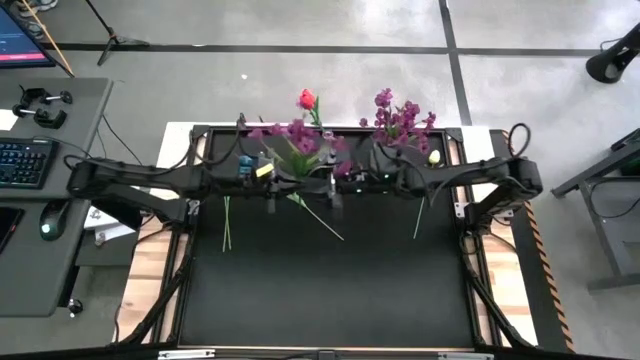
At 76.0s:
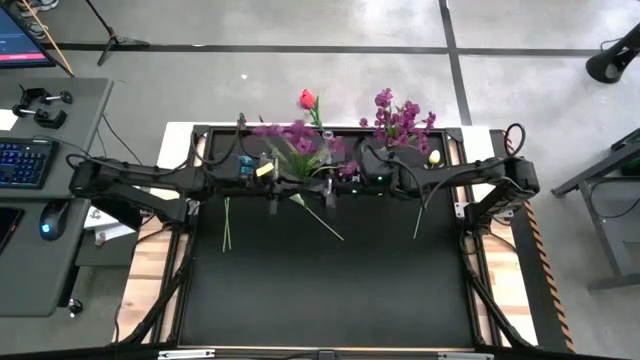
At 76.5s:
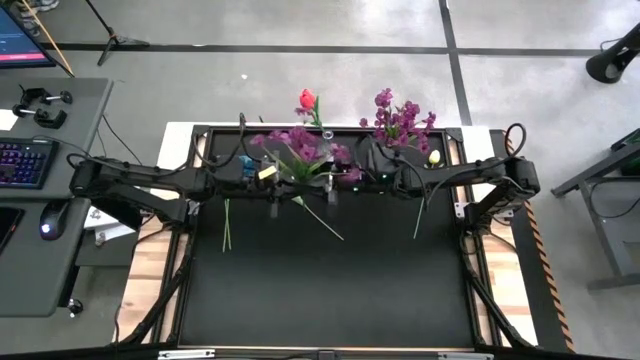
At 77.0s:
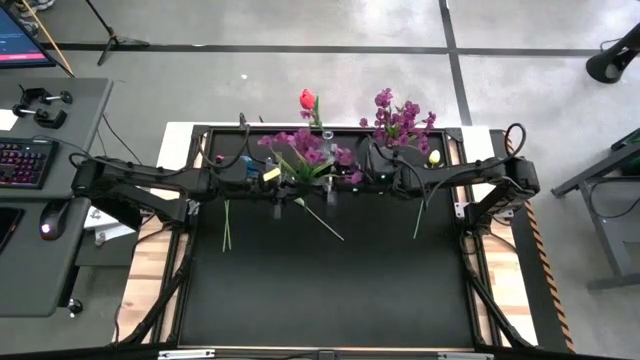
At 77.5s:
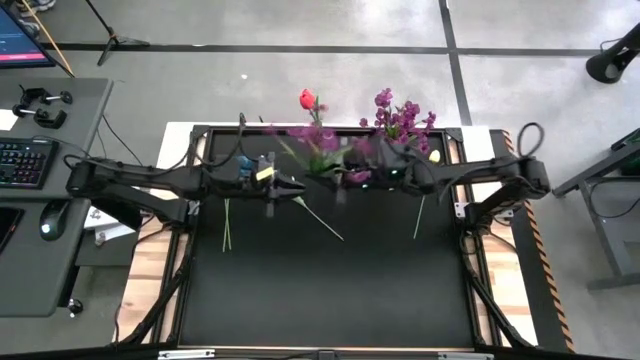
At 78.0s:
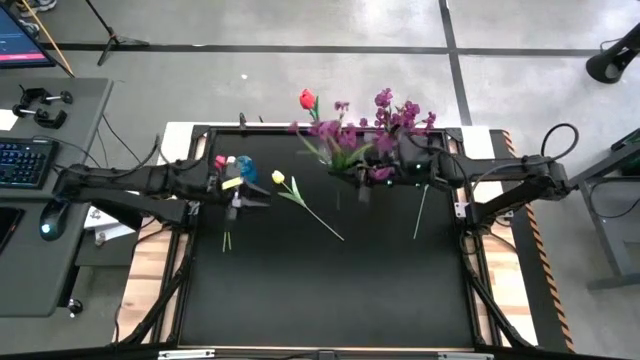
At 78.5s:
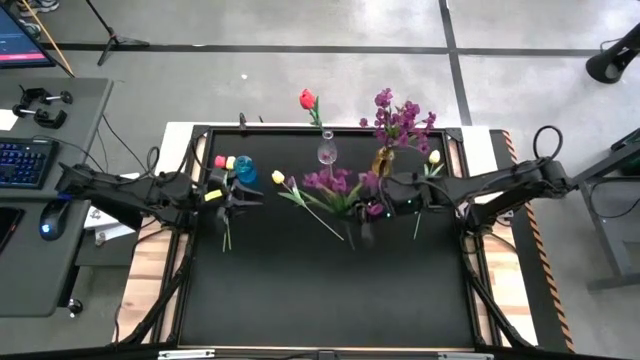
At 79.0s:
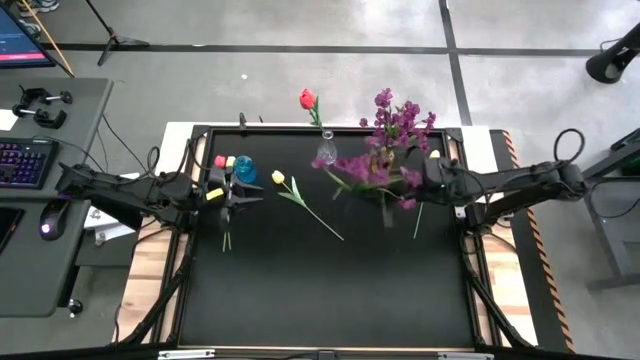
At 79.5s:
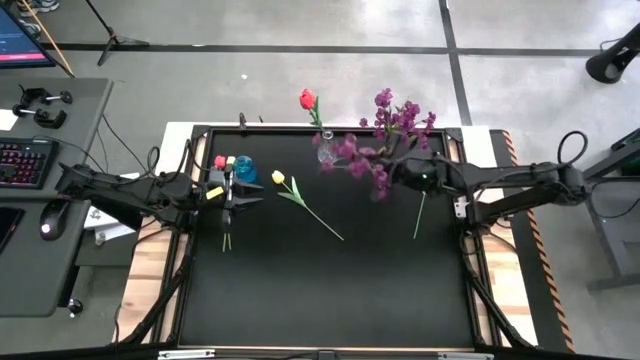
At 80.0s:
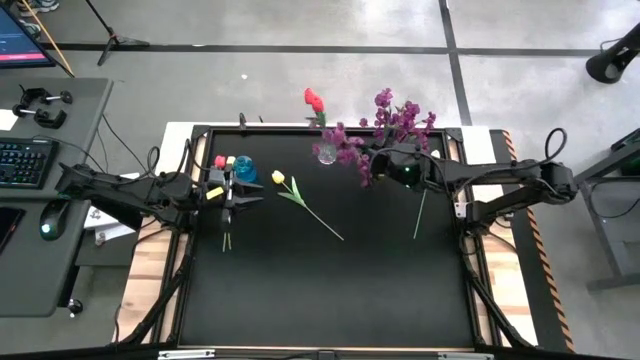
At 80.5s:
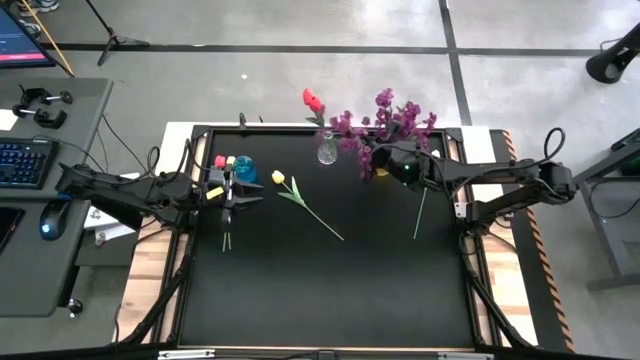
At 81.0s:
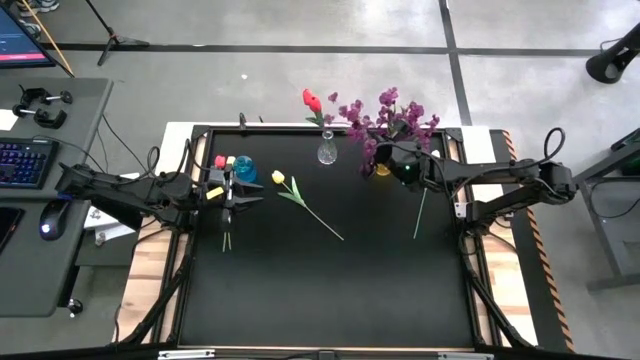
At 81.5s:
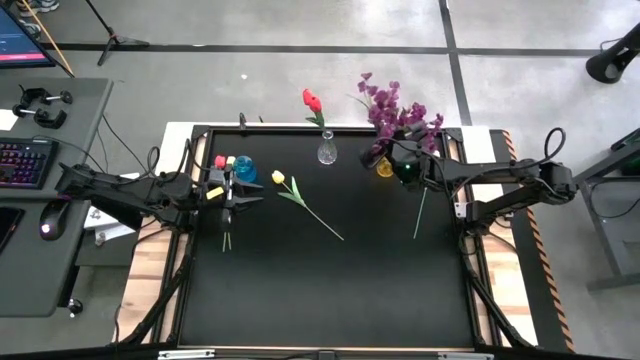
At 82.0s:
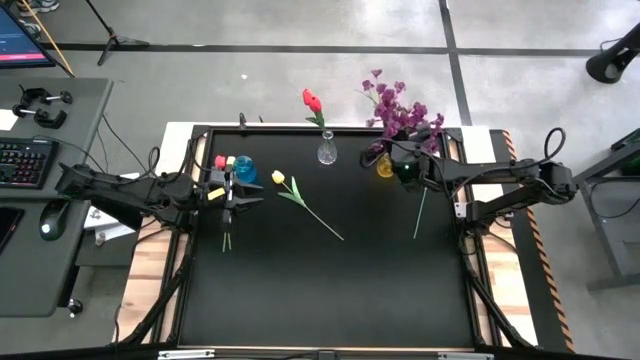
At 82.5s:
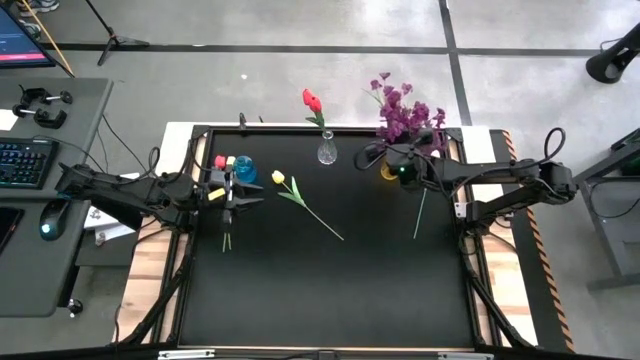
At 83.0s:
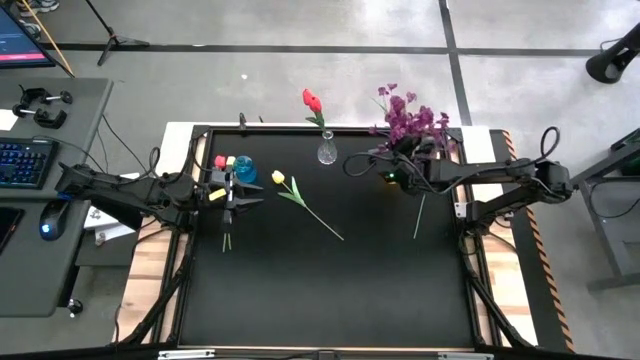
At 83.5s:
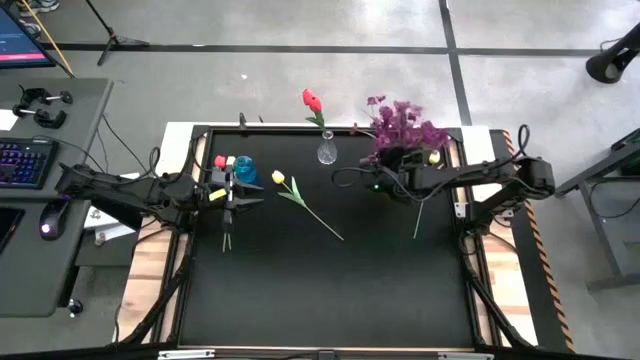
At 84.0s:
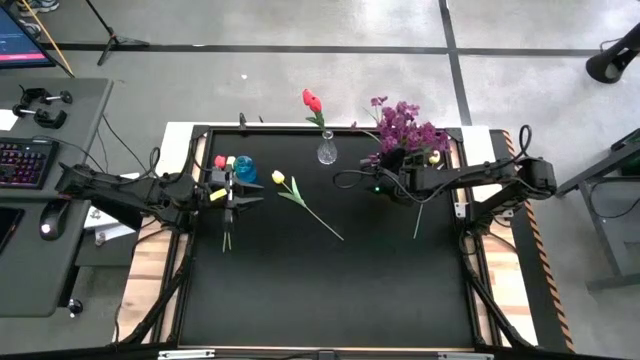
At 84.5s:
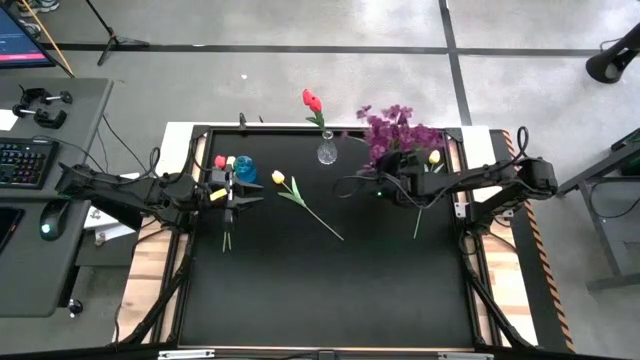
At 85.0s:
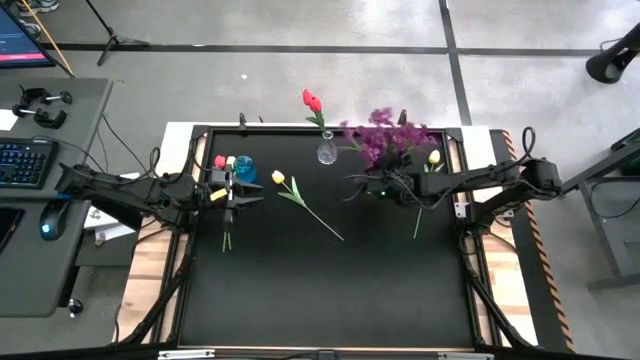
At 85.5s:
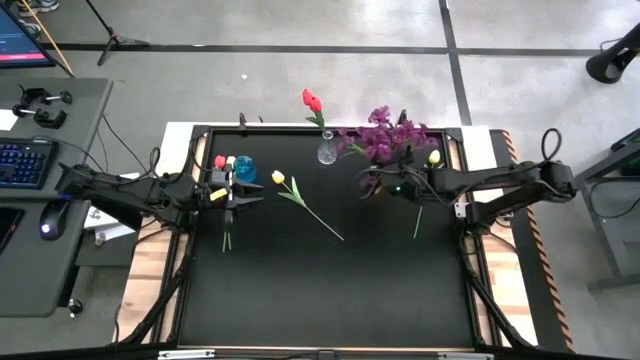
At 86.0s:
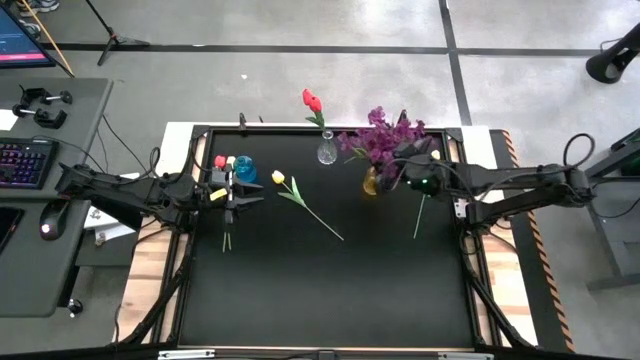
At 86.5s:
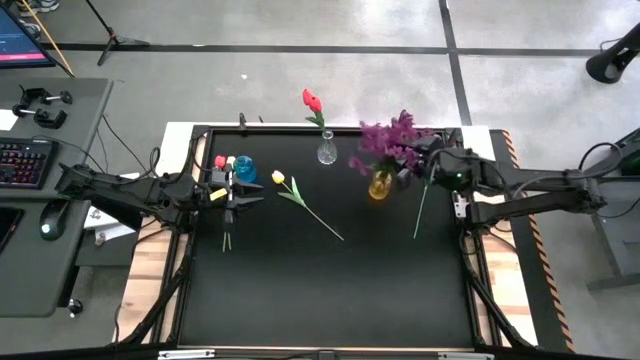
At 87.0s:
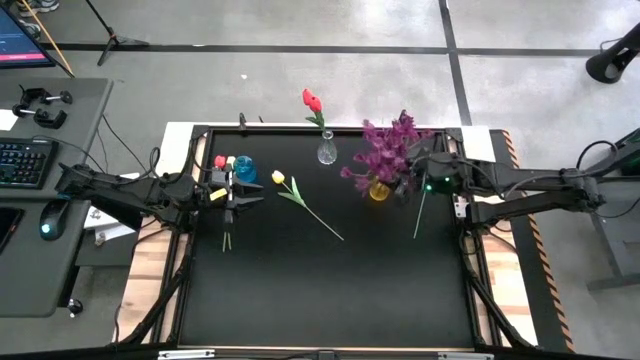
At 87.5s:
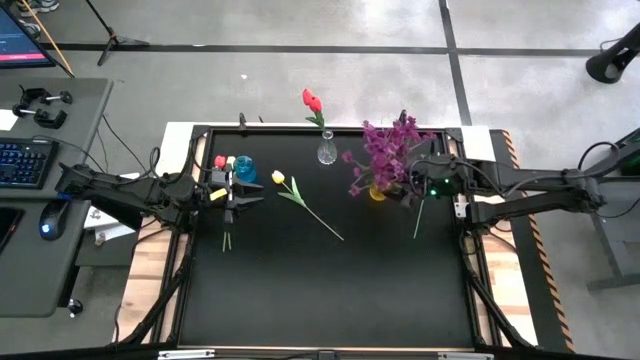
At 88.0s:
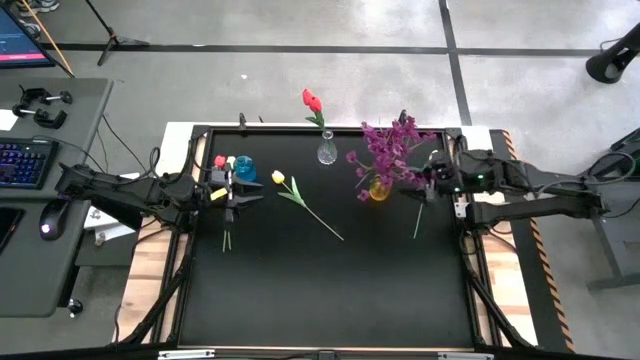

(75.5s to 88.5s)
Task: Sort flowers into vase by color
Put the purple flower into the yellow vase

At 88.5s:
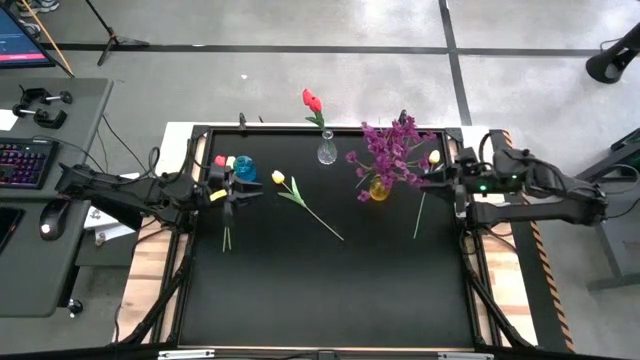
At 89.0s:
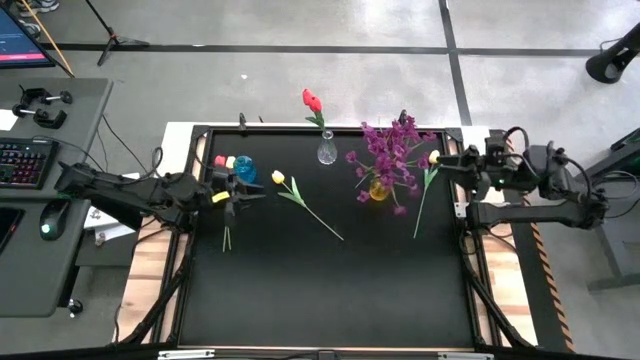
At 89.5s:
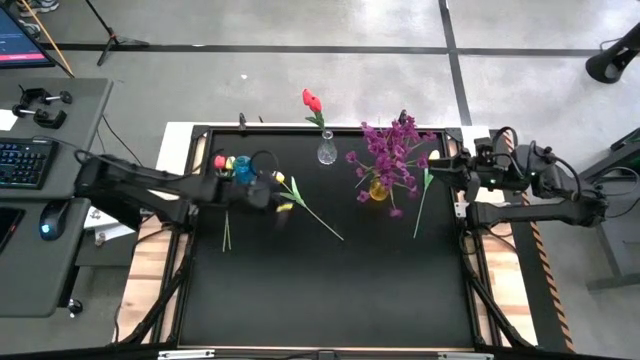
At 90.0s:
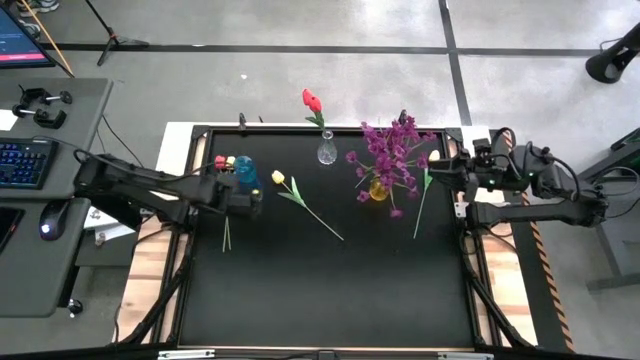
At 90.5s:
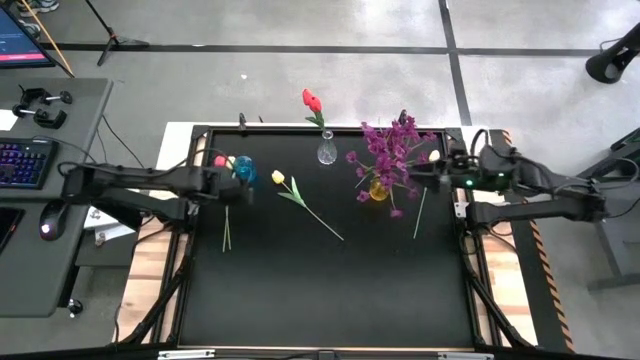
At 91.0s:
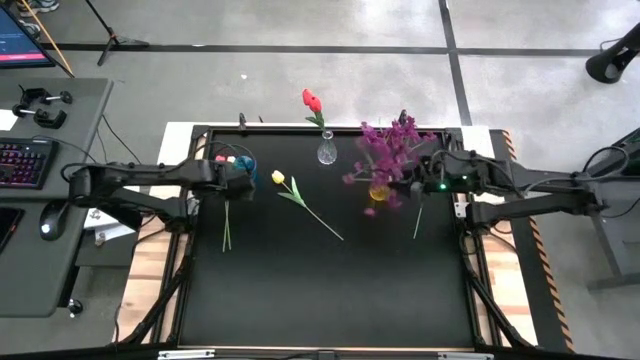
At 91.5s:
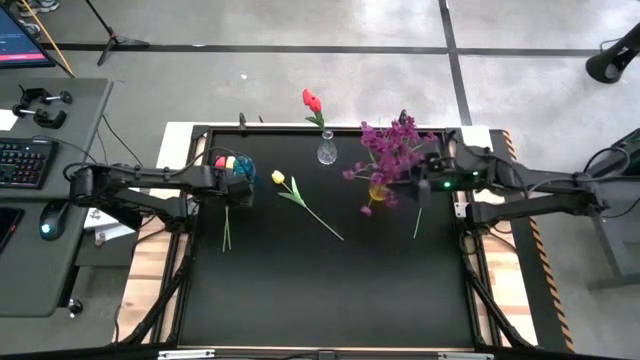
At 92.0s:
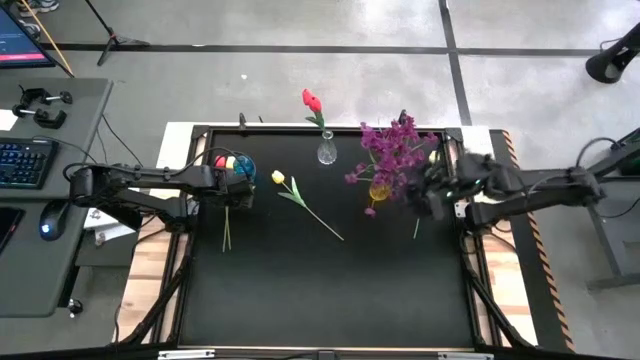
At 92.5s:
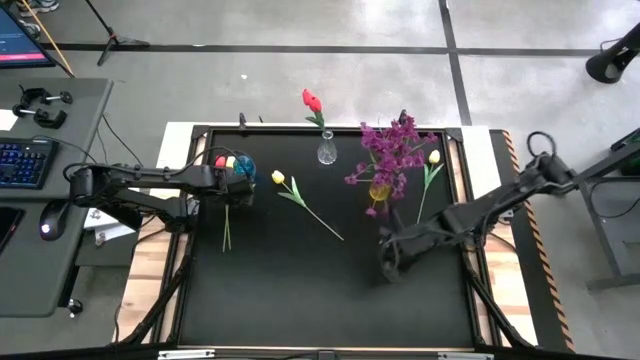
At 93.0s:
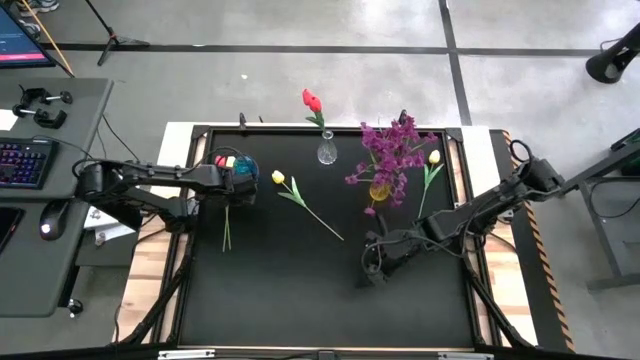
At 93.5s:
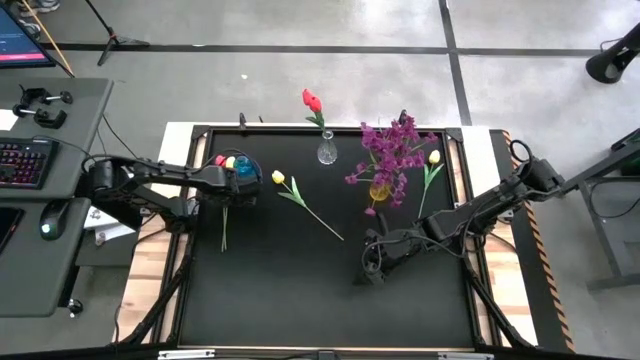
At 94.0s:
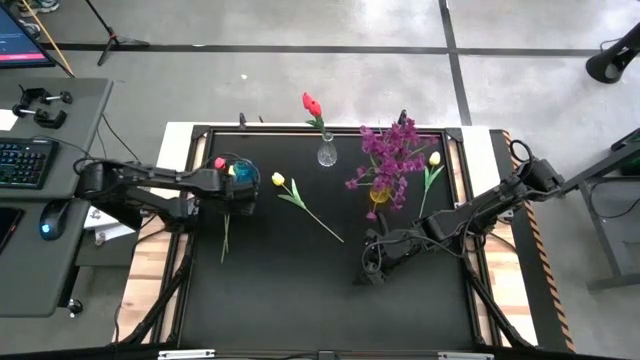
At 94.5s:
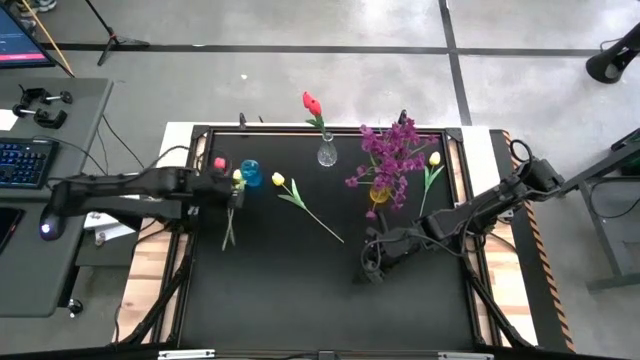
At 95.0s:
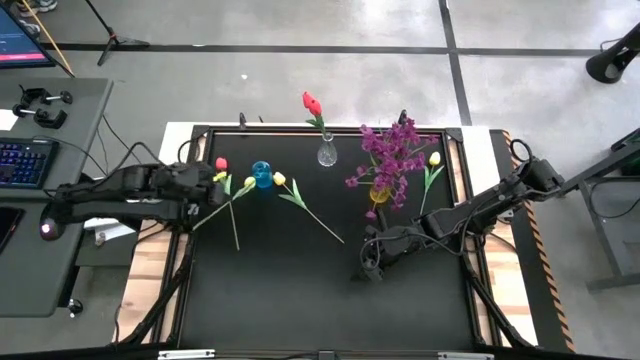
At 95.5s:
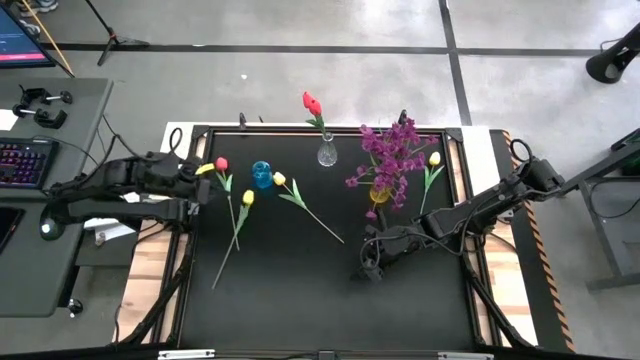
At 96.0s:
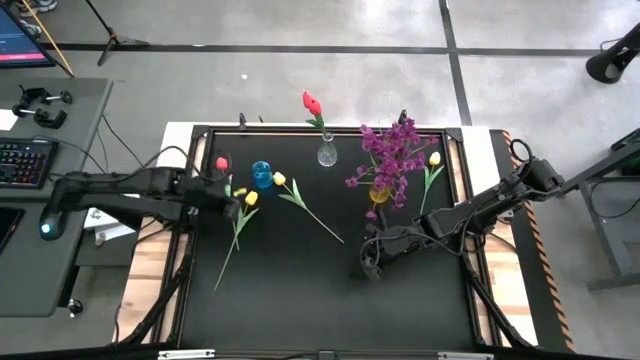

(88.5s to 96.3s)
Put the left yellow flower into the blue vase

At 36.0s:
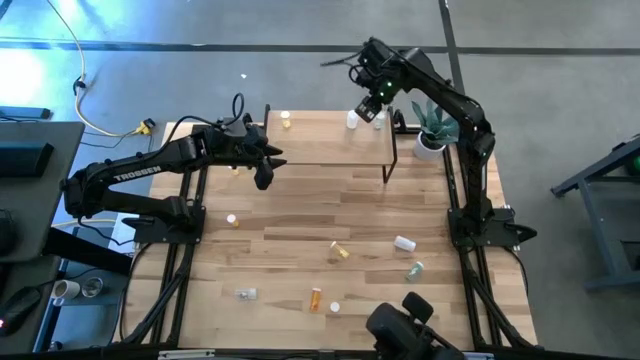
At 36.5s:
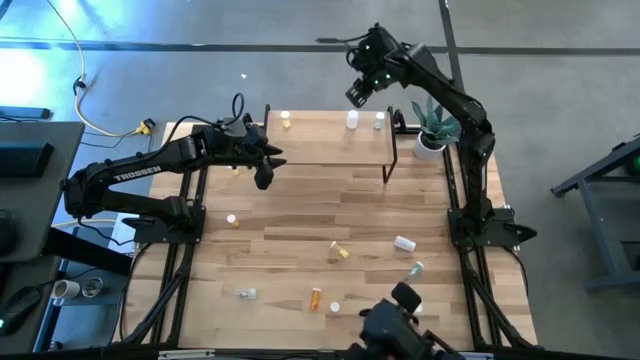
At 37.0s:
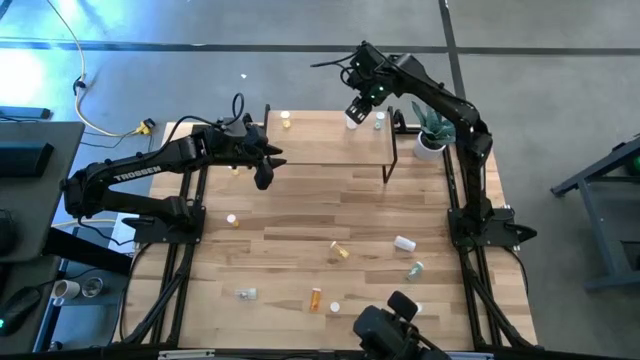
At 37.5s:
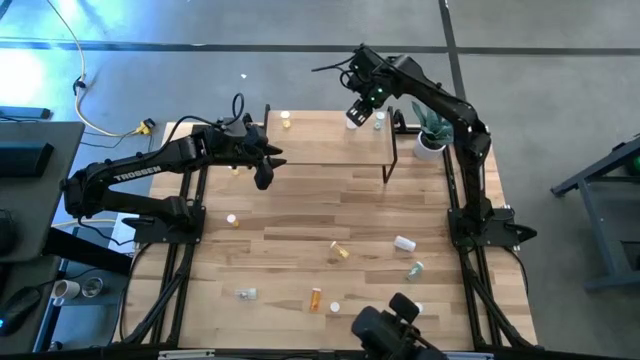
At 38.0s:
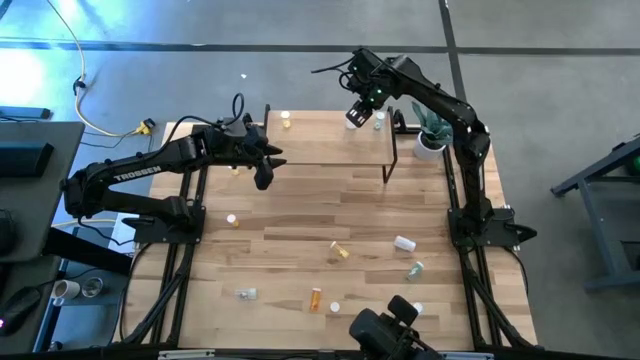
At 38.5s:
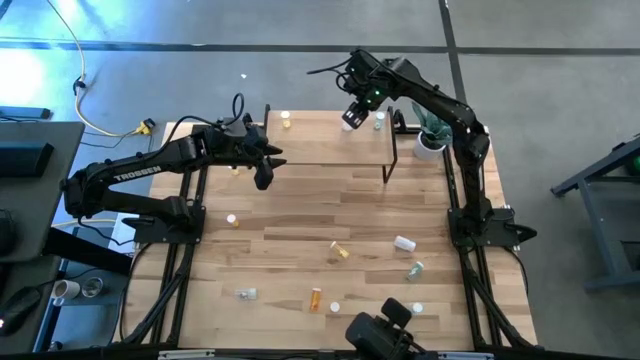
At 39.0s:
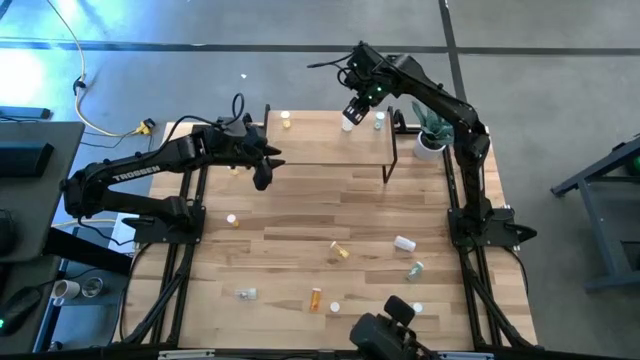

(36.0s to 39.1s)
Task: Pick and place medicine bottles onto shelf by color
Adjust the white pill bottle on the shelf
